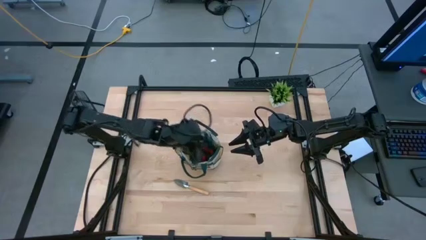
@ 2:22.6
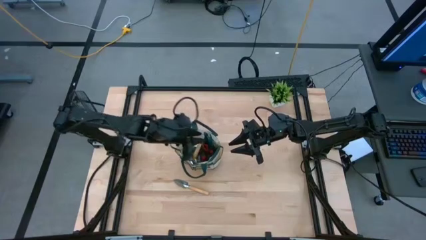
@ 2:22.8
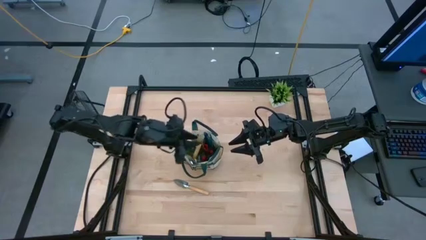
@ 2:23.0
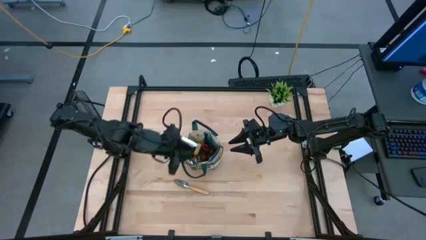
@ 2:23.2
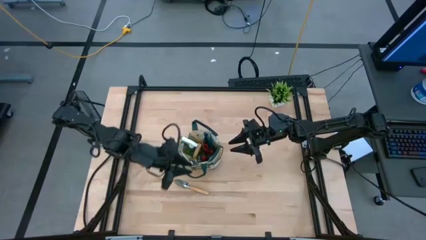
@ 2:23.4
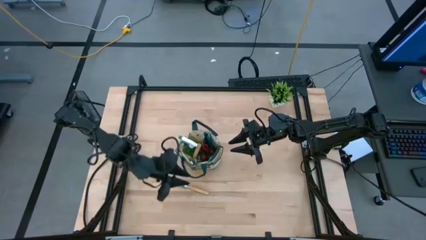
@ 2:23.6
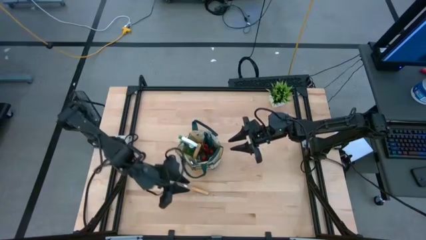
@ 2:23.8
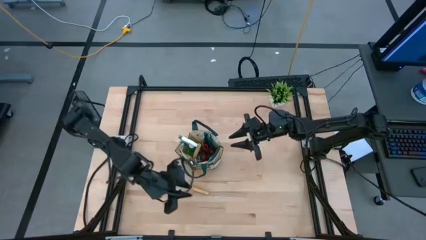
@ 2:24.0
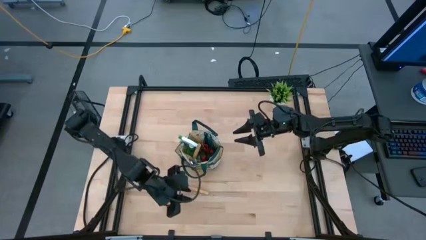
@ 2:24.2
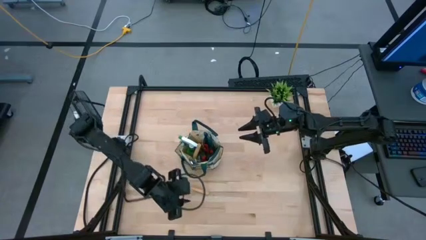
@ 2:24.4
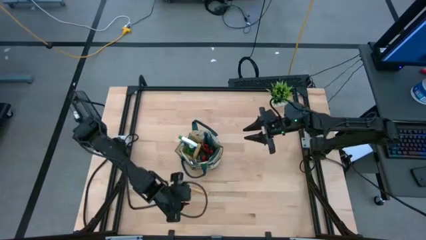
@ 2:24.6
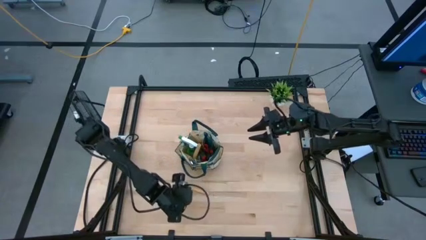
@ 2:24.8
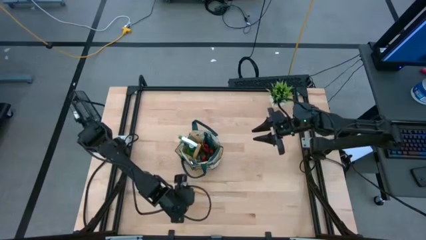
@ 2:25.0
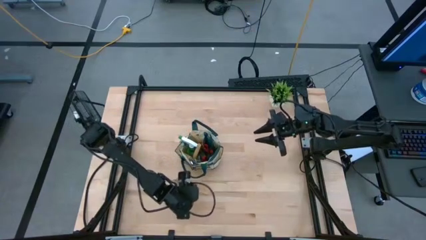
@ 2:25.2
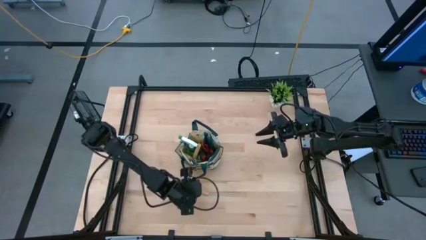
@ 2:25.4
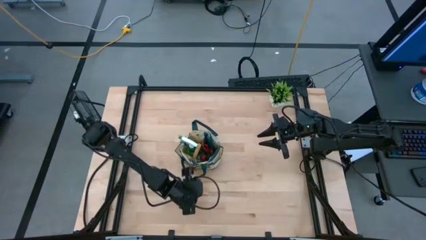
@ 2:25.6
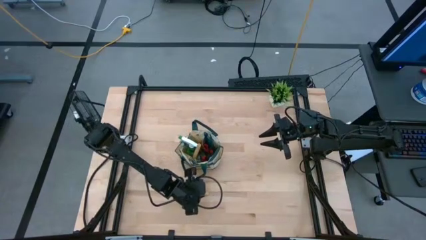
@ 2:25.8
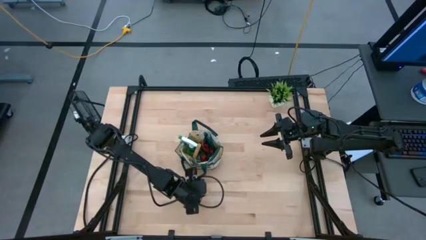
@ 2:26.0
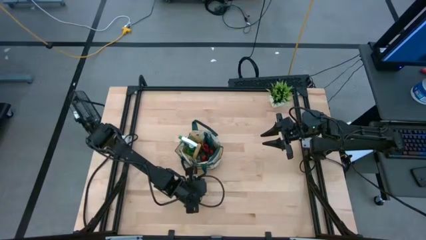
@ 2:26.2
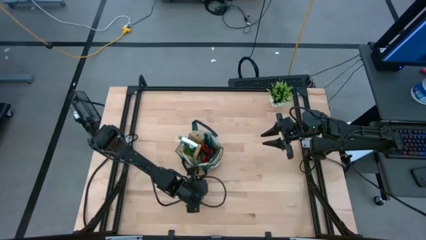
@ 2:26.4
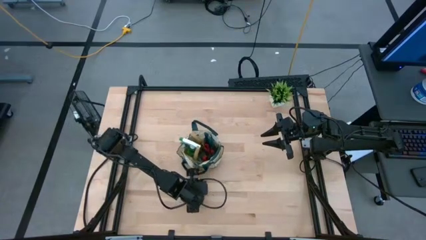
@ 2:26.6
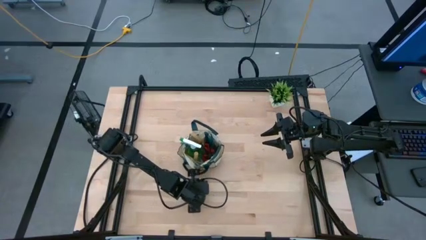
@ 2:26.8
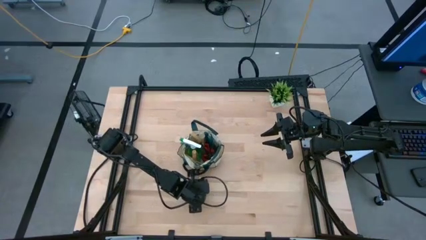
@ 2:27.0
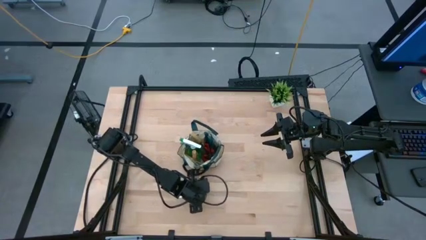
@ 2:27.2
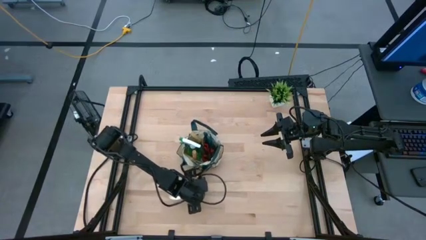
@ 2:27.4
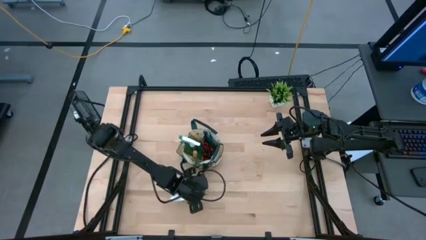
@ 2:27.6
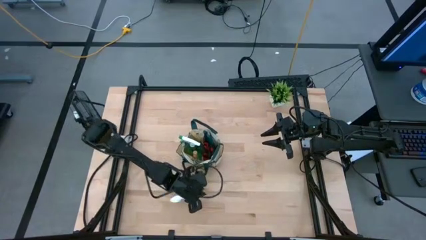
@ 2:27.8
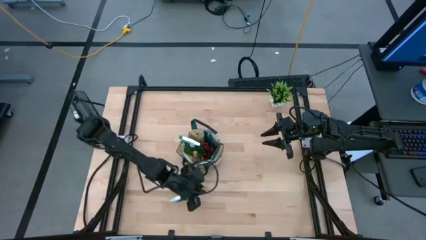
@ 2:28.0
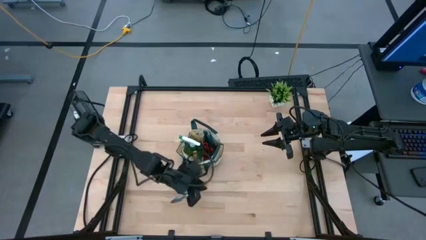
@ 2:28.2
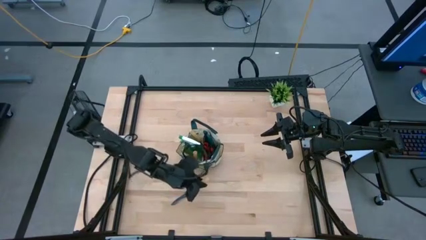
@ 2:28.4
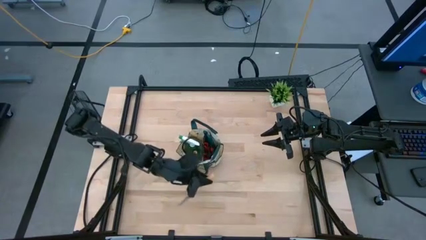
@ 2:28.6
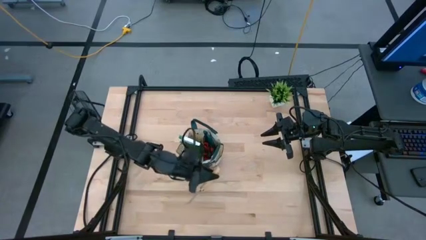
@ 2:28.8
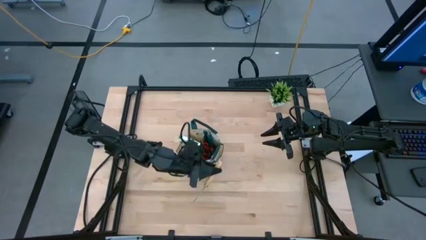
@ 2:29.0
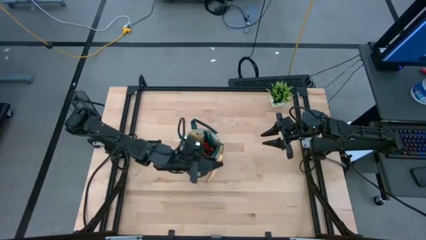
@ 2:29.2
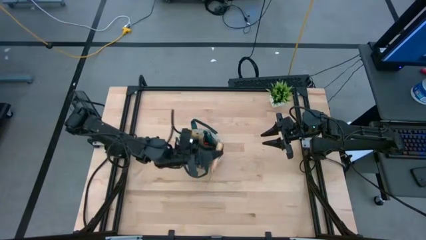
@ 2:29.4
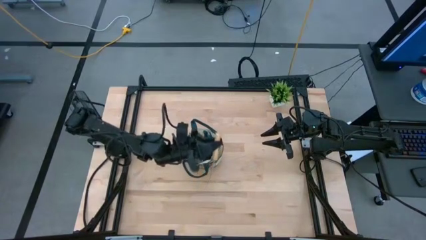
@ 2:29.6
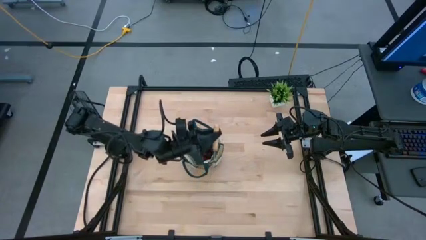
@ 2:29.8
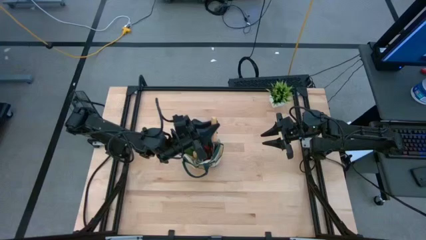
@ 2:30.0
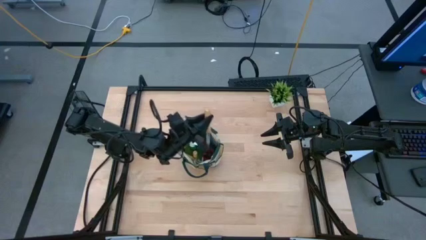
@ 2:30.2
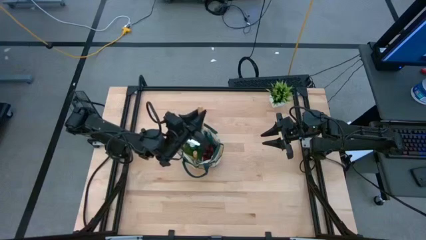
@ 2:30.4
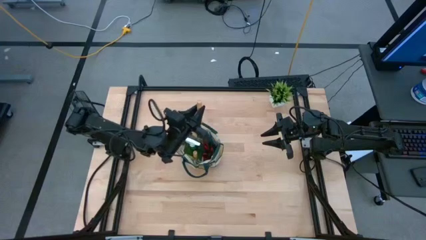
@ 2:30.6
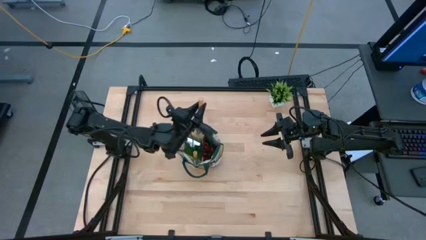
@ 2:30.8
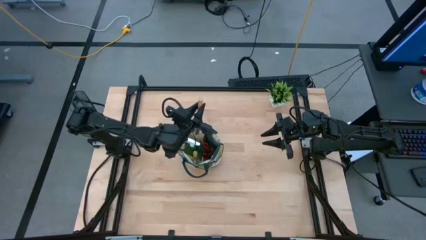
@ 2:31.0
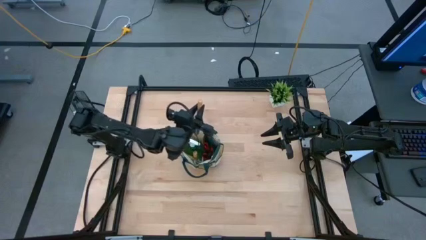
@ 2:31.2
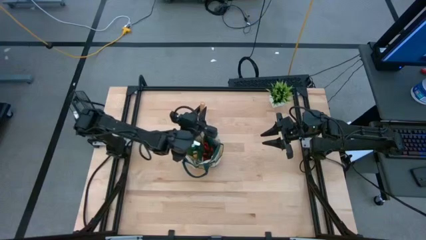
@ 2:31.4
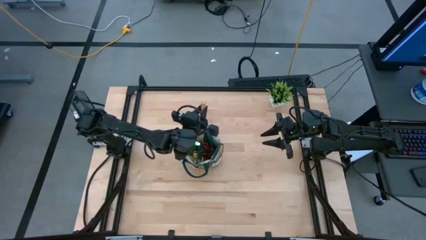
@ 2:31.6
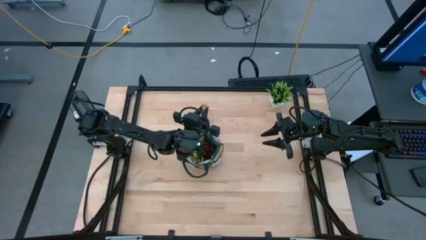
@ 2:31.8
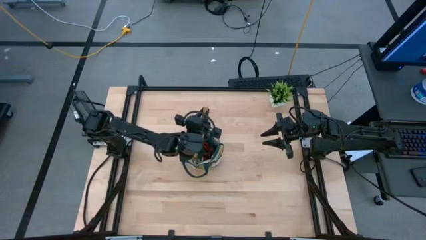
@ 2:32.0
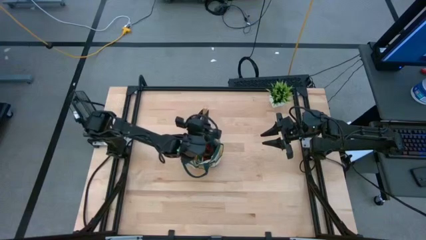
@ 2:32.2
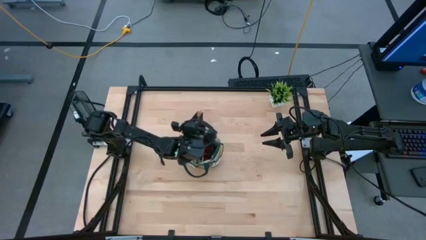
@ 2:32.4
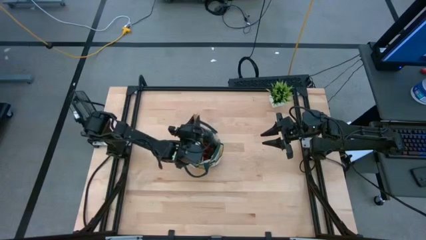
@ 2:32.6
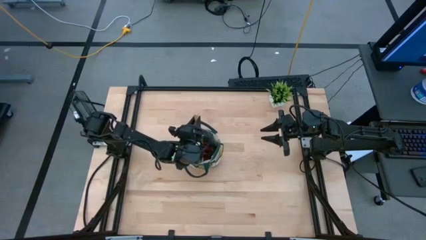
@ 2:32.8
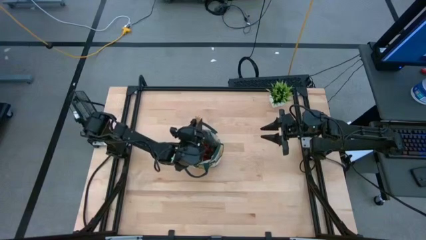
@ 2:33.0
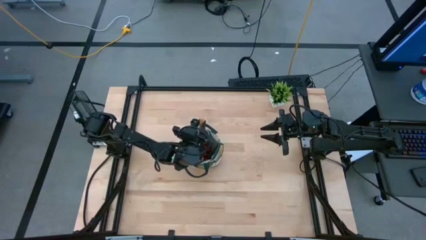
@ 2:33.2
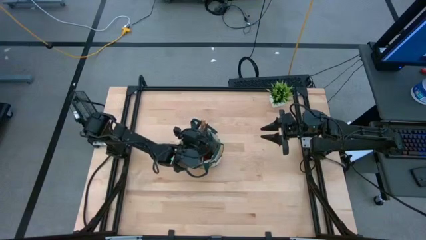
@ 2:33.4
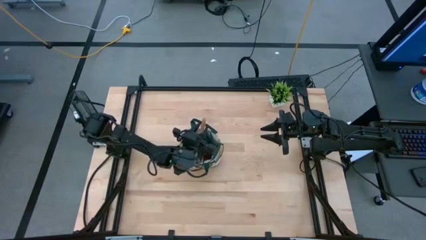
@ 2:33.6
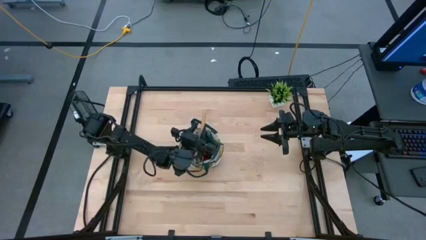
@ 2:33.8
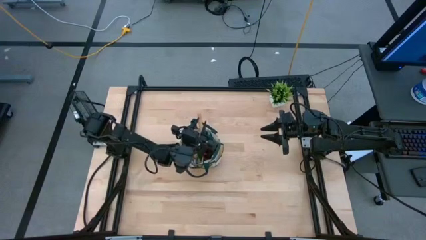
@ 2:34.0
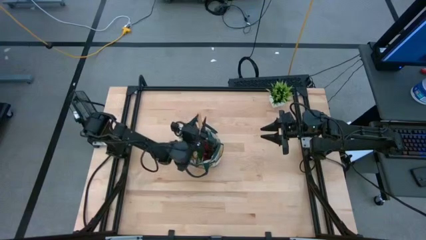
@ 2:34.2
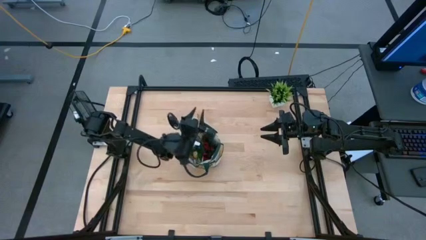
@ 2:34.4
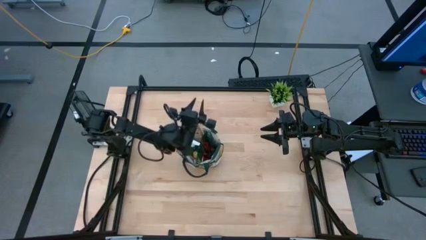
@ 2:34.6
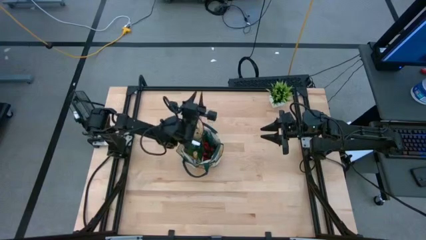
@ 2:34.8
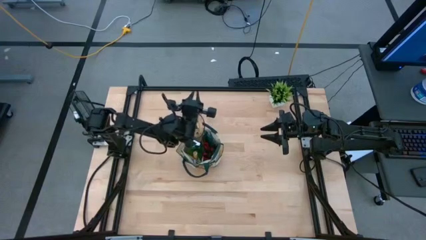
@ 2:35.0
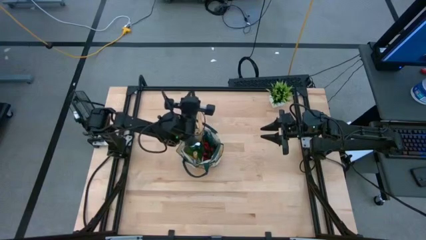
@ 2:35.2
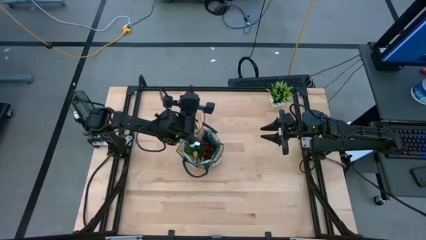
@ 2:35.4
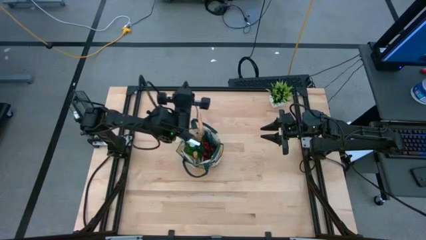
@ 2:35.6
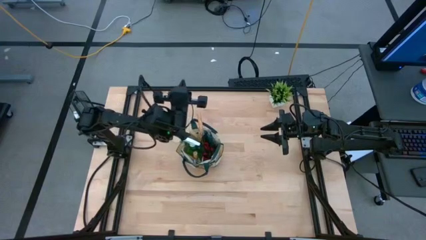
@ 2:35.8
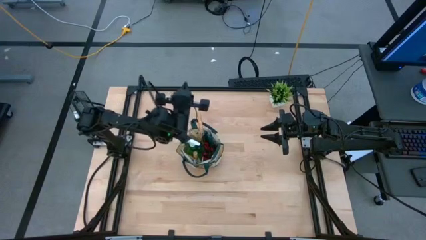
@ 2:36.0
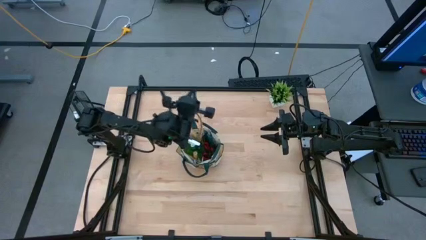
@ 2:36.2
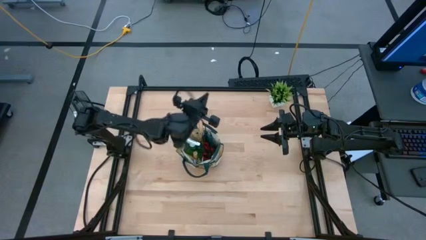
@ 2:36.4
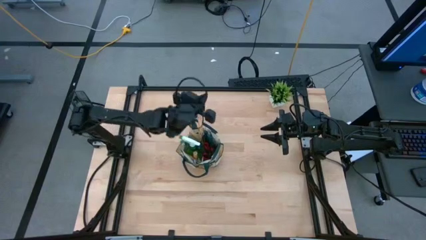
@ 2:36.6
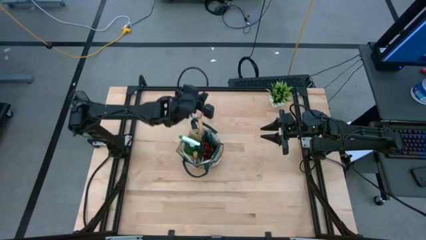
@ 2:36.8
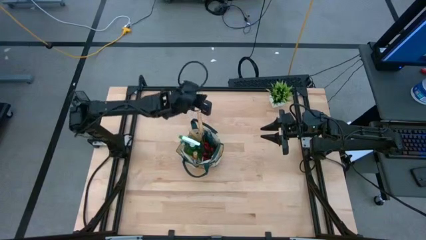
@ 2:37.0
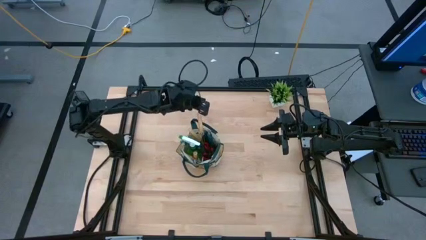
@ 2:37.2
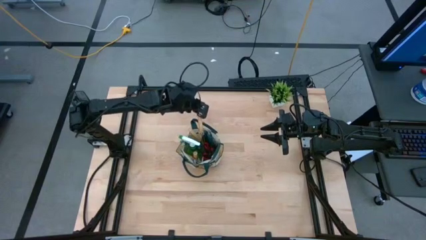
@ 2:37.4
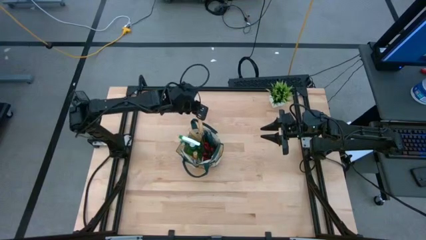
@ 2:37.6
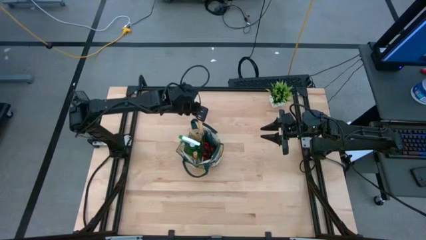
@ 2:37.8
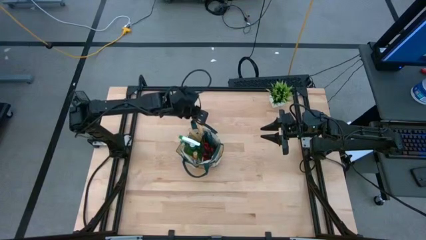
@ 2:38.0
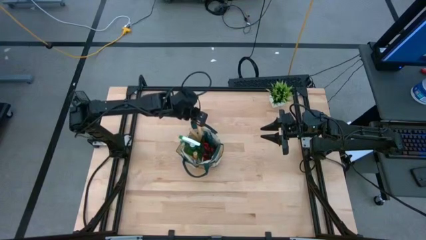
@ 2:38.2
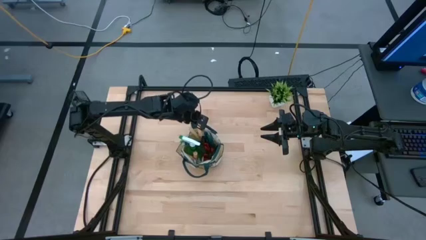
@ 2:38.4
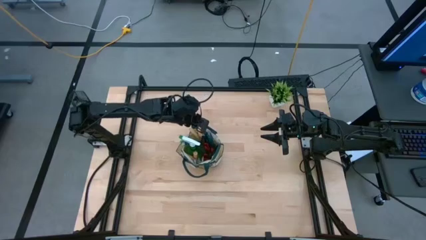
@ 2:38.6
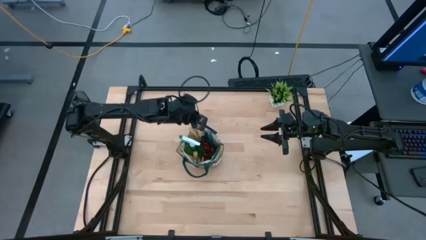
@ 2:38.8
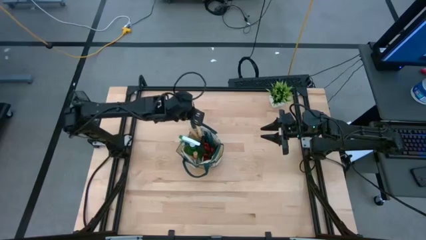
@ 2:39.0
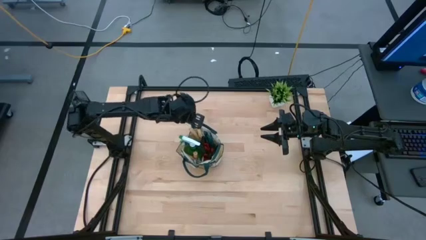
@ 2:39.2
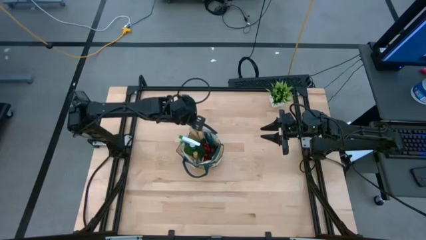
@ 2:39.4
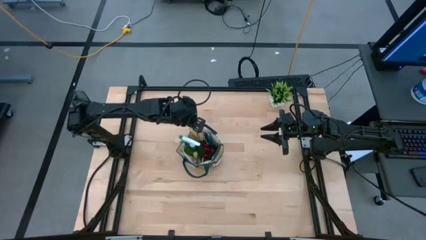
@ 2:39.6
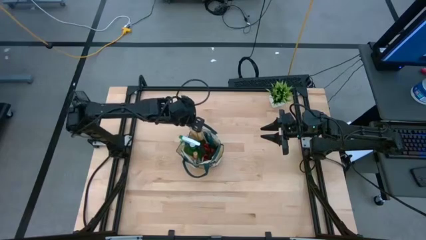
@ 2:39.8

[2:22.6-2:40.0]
Task: Pick & Place Garden tools in Gardening bag
Put the brown trowel into the gardening bag
